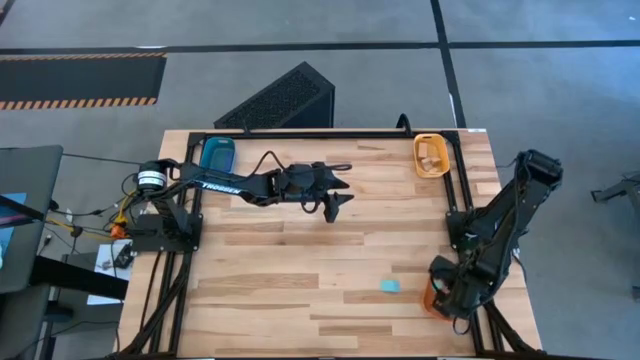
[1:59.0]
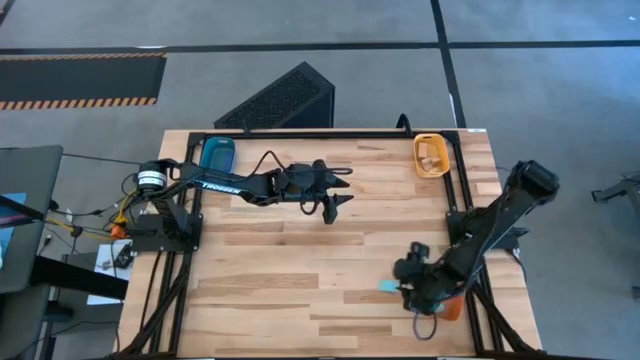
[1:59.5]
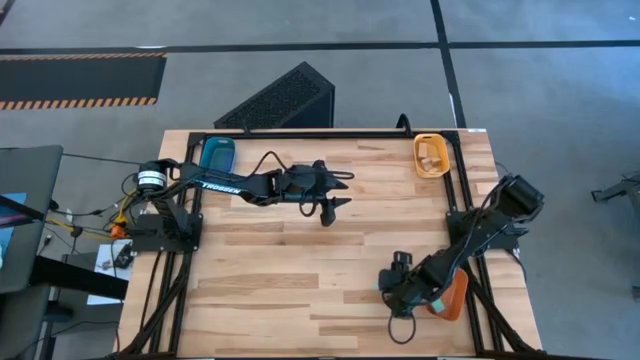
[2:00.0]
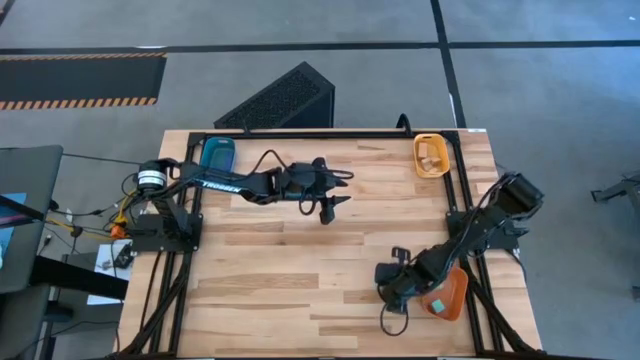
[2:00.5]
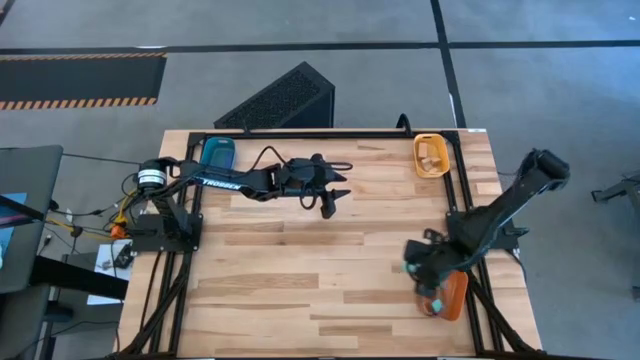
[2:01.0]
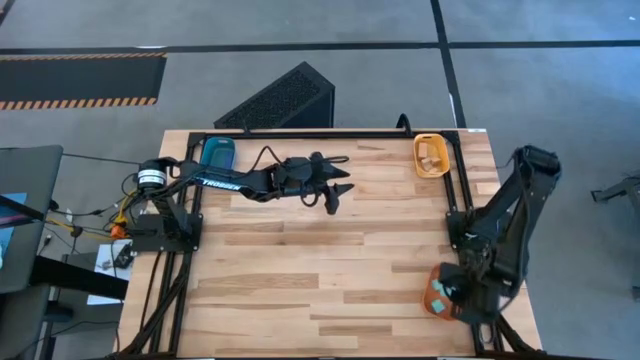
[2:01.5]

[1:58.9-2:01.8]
Task: Sort & place blocks by color
Put the light blue block into the orange bin

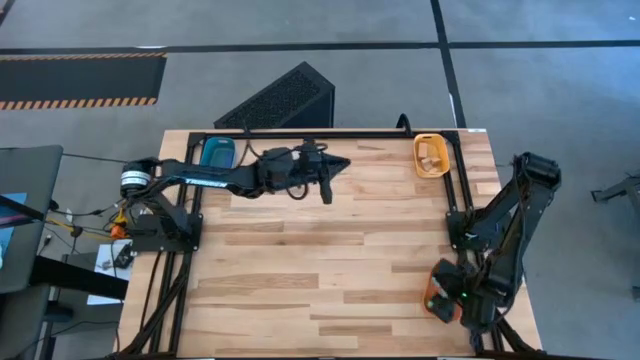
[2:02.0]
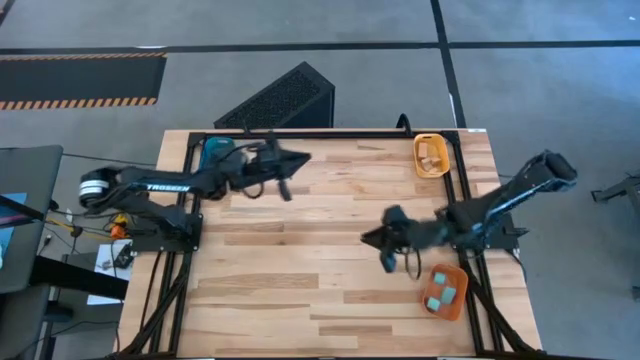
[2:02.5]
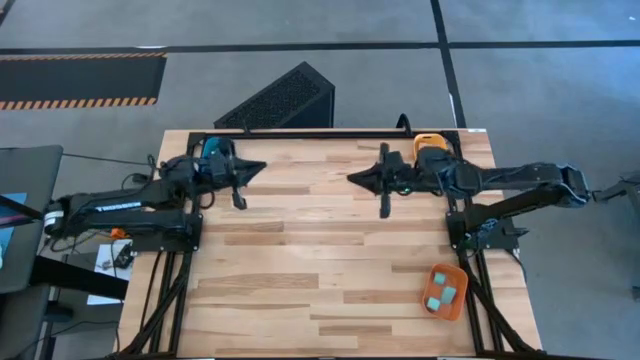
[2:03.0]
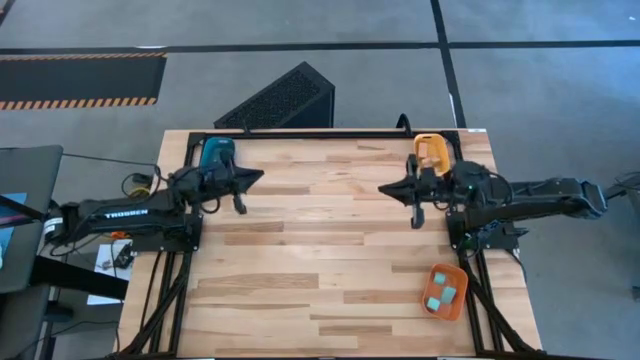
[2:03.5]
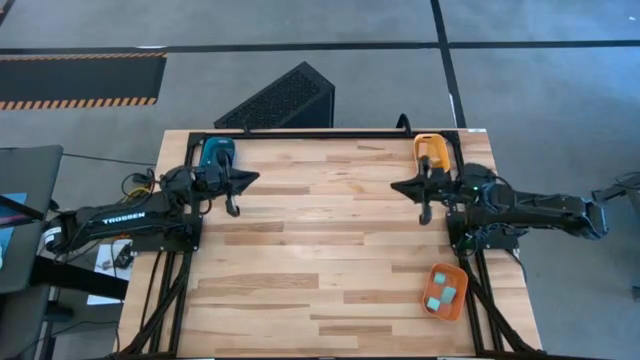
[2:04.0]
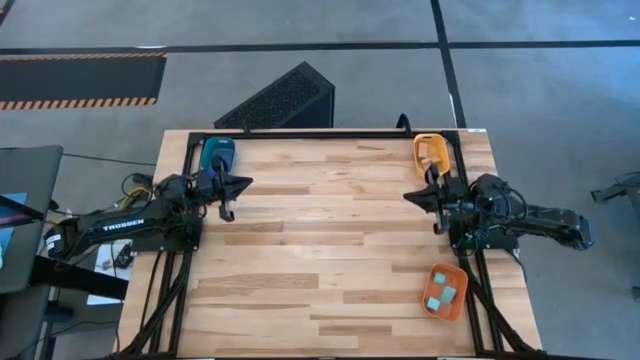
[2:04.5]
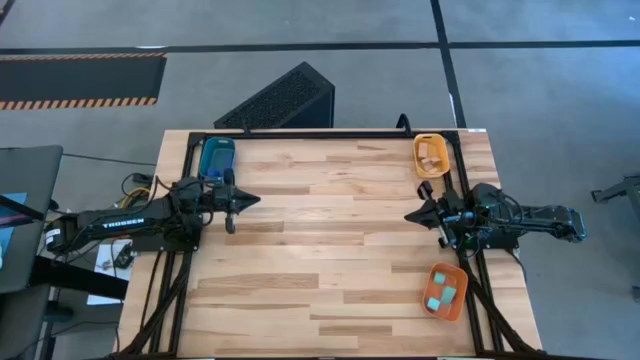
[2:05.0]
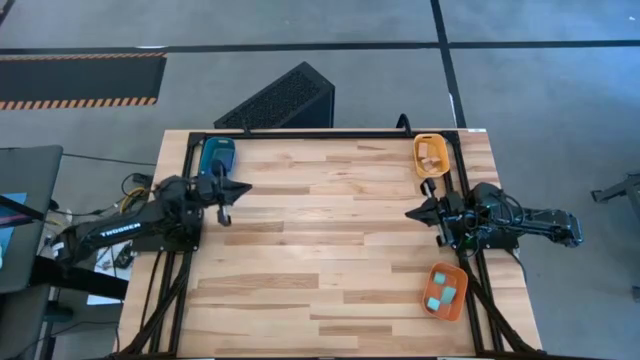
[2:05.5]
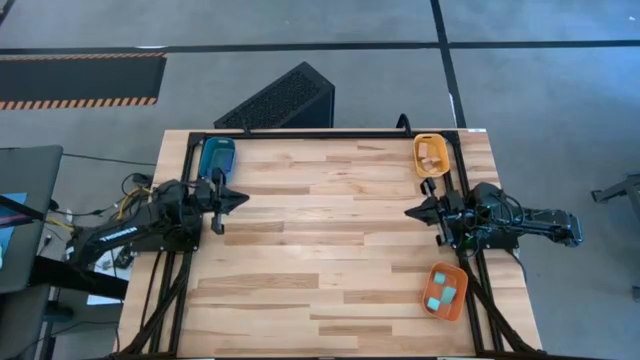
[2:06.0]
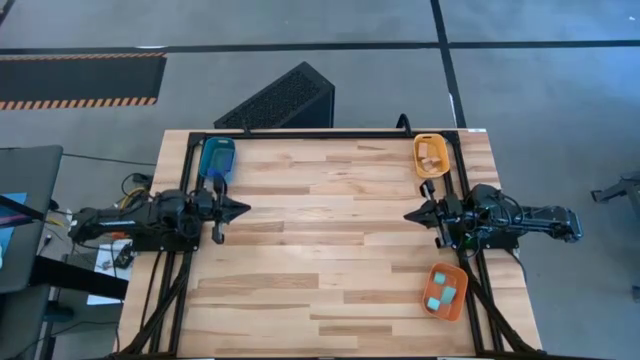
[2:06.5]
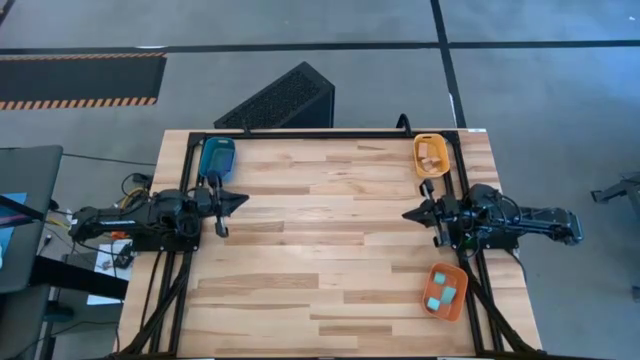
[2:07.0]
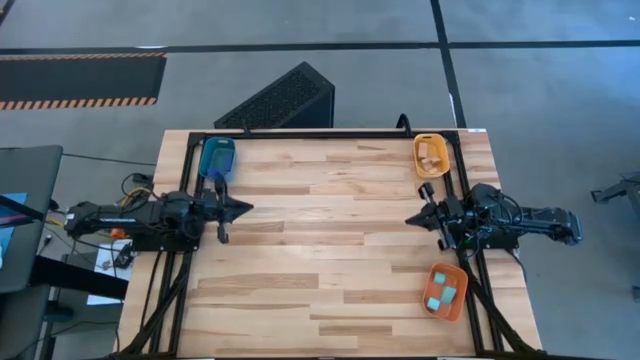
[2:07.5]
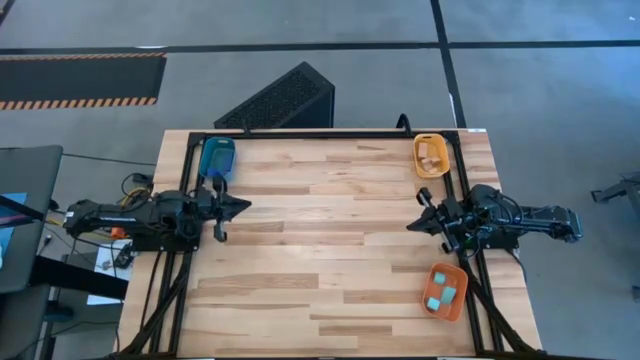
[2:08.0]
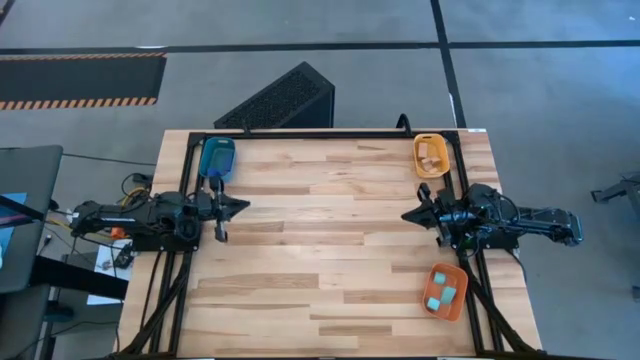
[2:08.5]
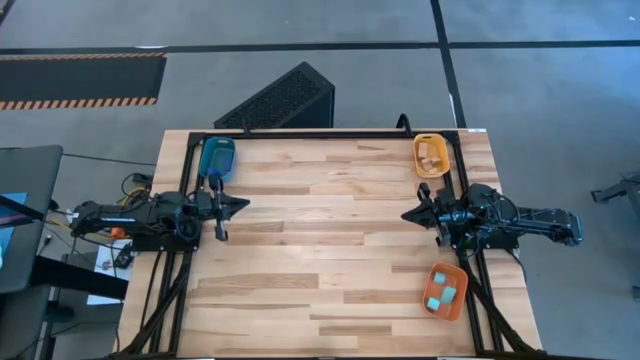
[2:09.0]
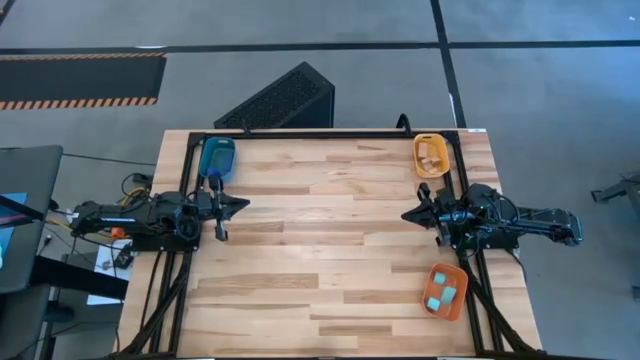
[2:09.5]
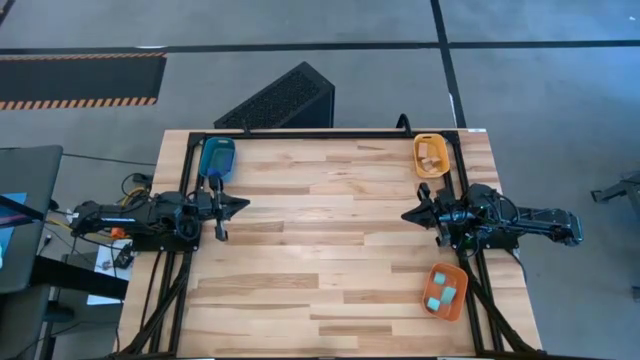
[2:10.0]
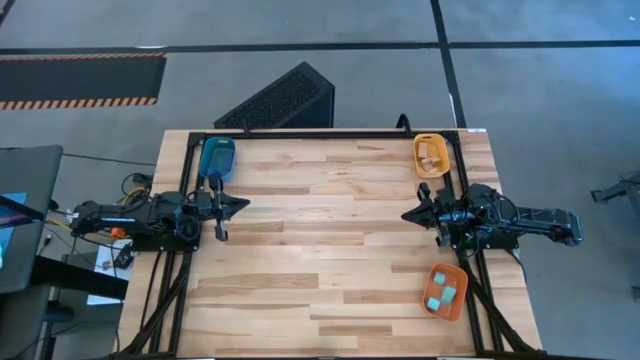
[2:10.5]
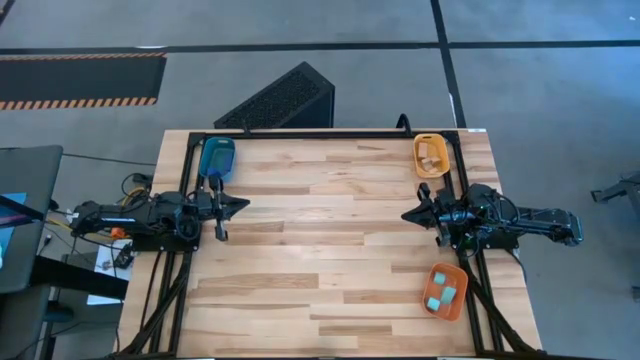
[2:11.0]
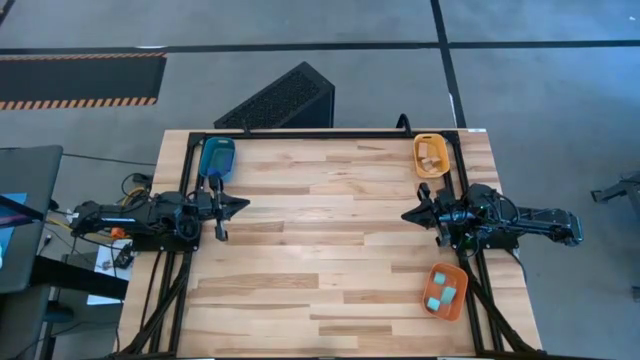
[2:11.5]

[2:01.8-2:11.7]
Return to Home Position

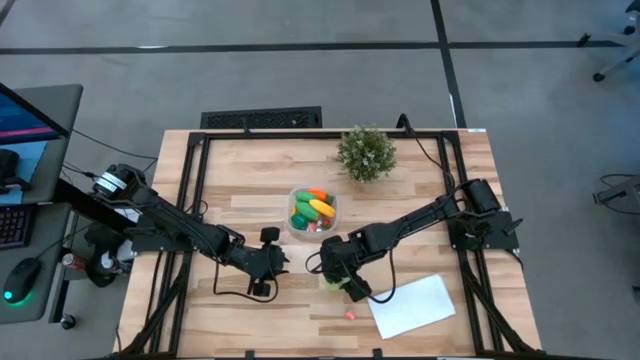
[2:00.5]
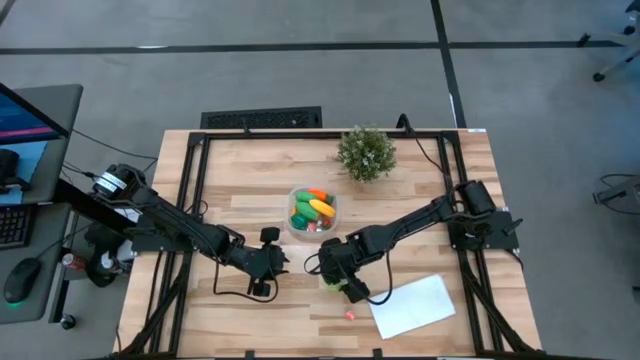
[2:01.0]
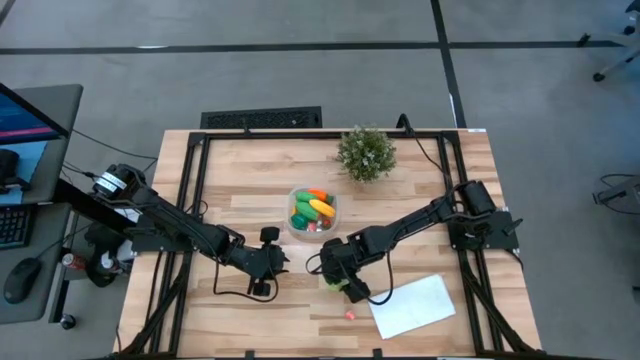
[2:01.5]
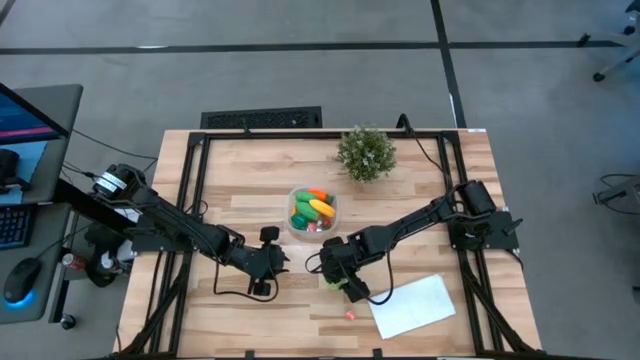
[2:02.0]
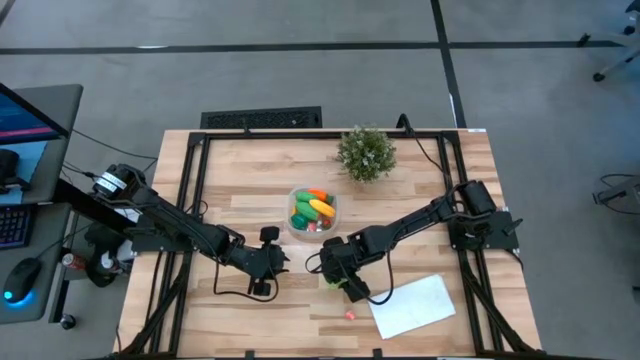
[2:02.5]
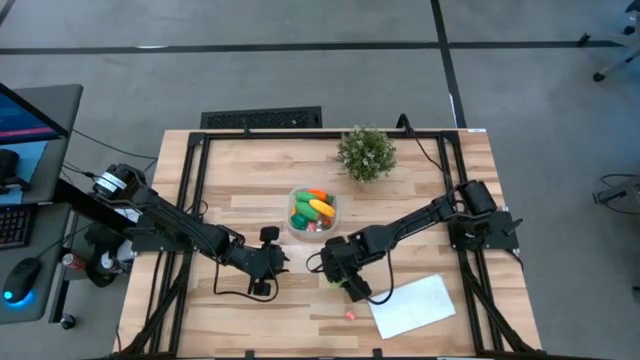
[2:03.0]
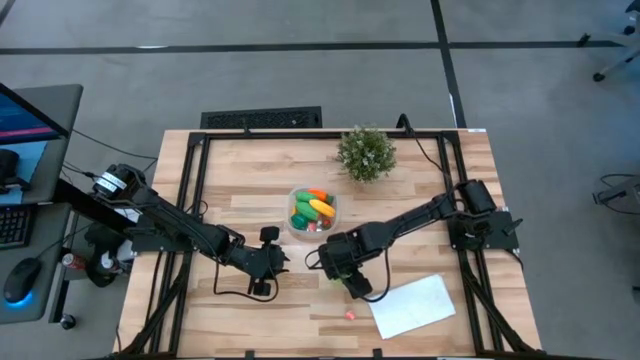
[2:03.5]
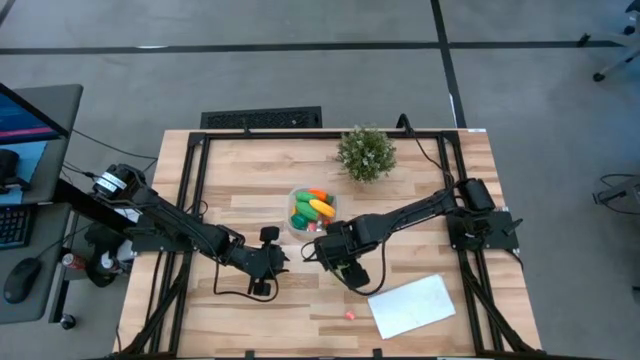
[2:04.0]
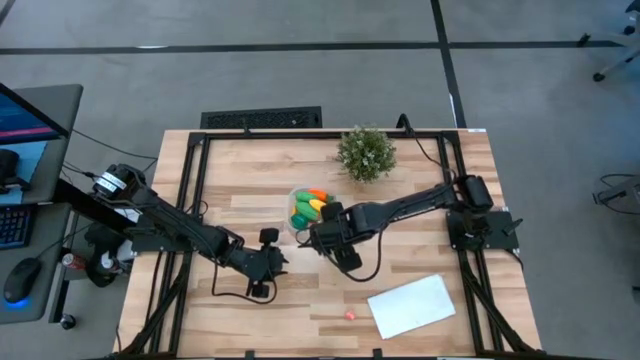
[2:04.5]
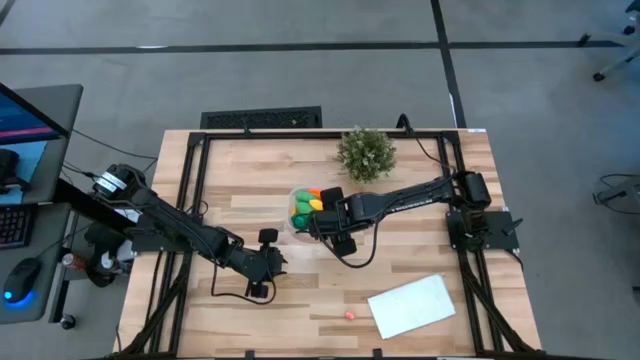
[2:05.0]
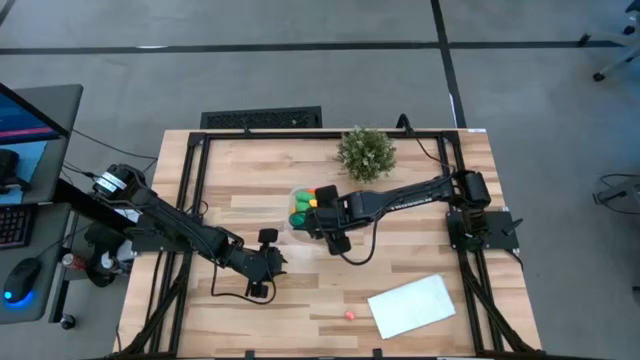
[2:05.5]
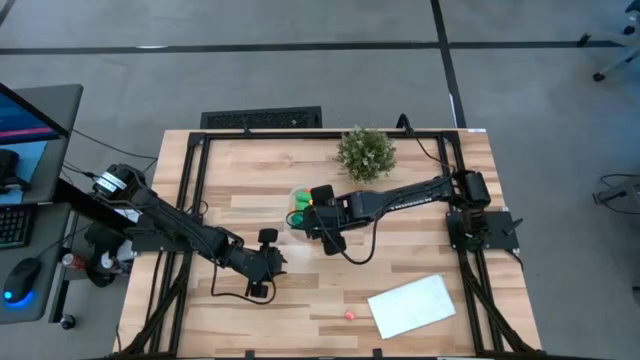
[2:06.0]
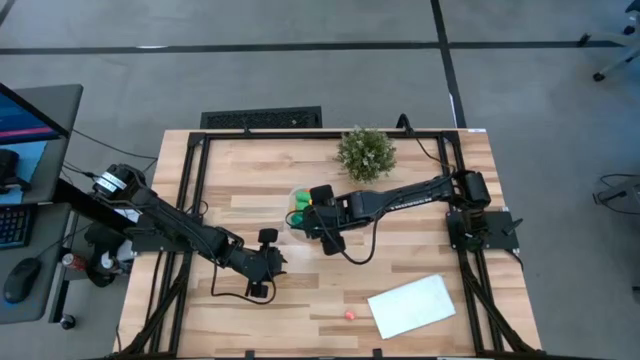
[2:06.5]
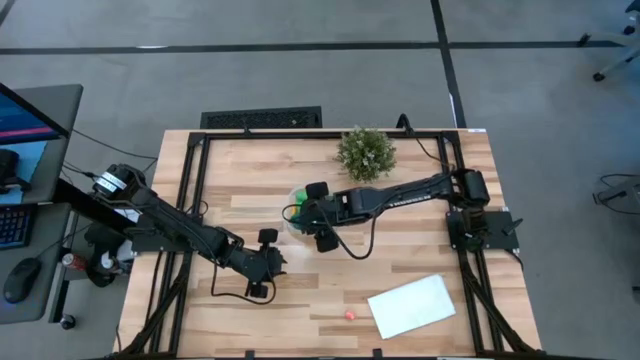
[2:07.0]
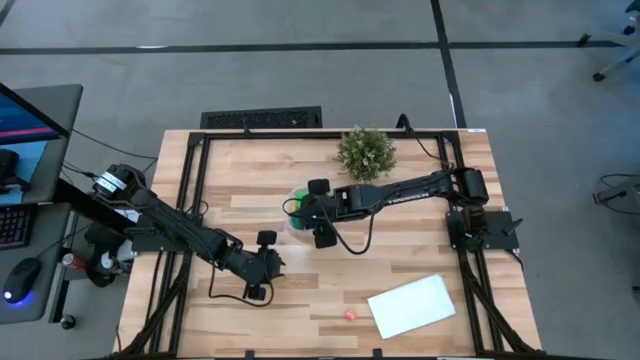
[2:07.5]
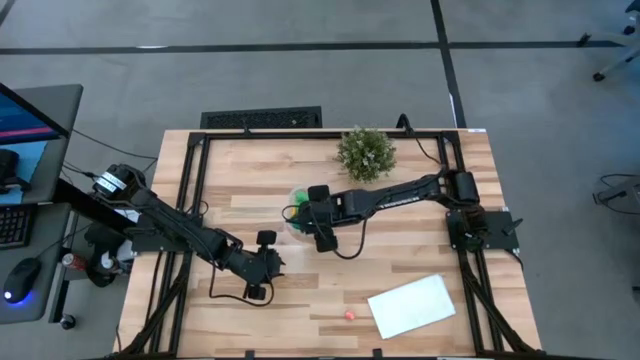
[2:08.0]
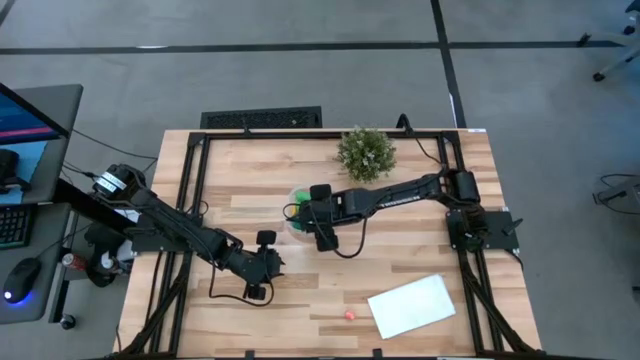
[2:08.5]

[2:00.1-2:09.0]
Task: Pick and placing Produce into tupperware
Put the green starfruit into the transparent container
